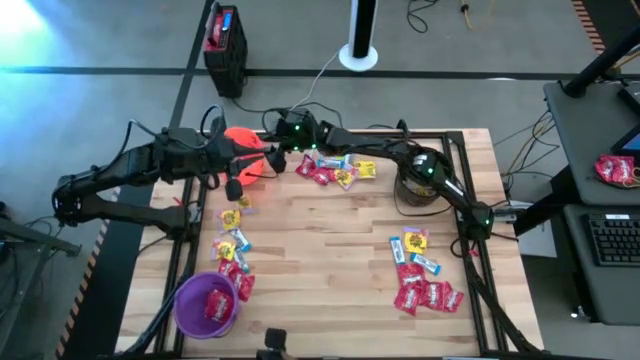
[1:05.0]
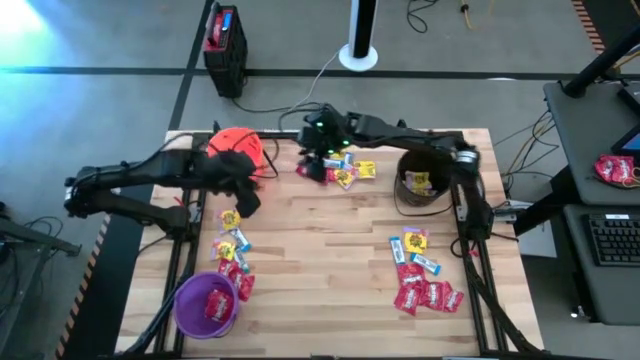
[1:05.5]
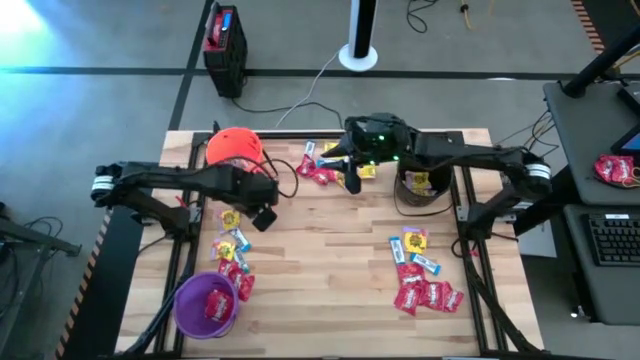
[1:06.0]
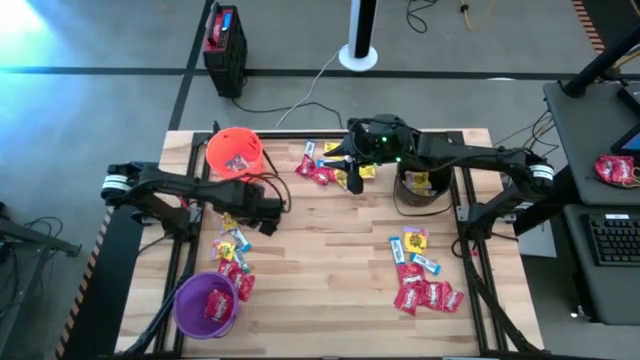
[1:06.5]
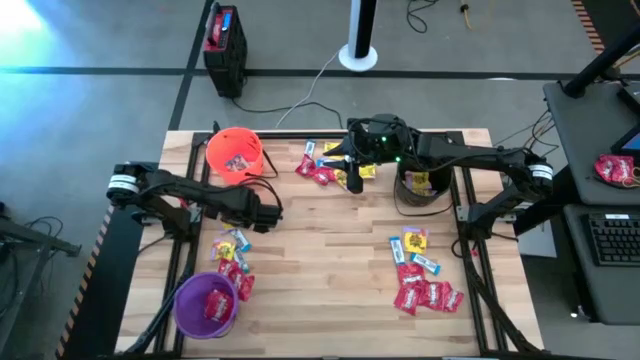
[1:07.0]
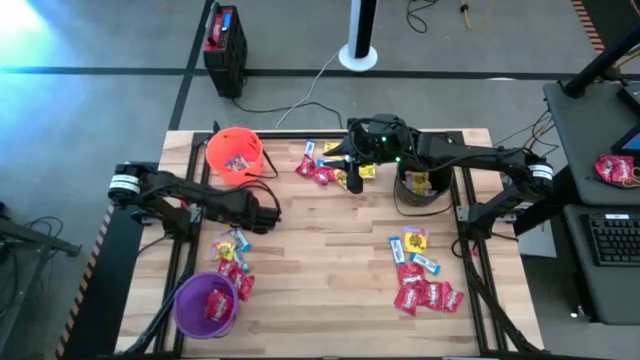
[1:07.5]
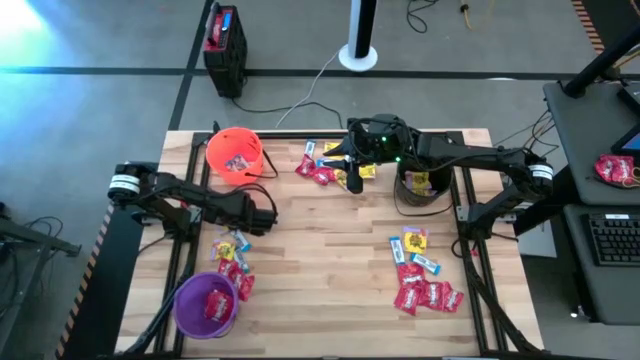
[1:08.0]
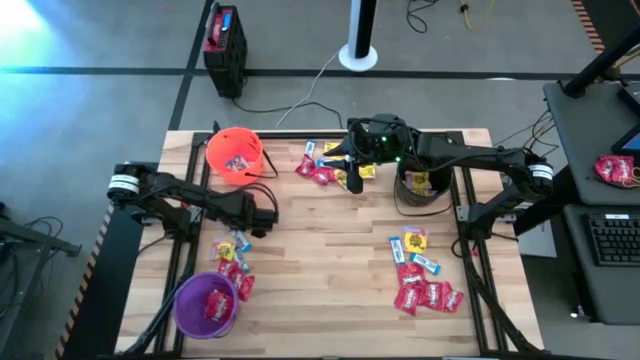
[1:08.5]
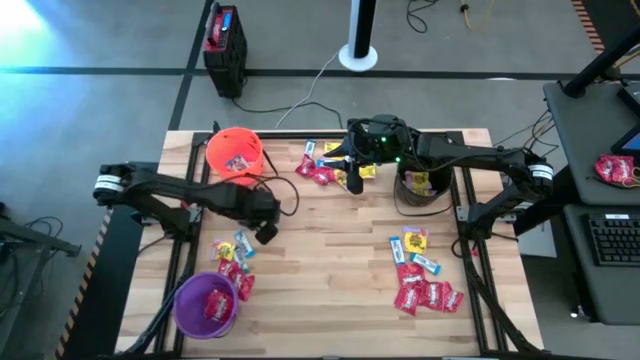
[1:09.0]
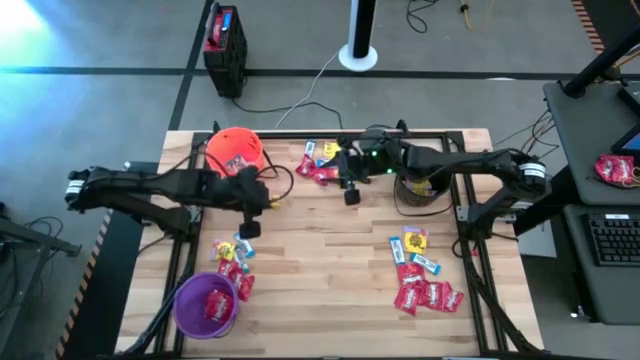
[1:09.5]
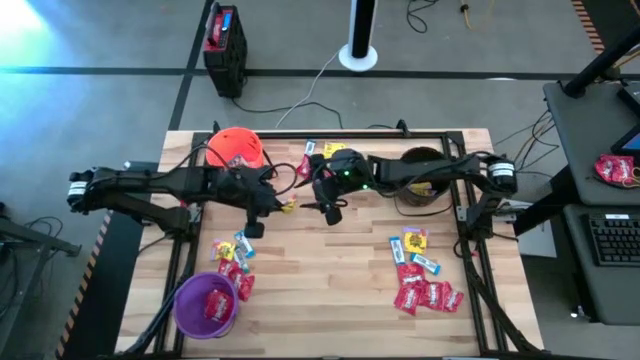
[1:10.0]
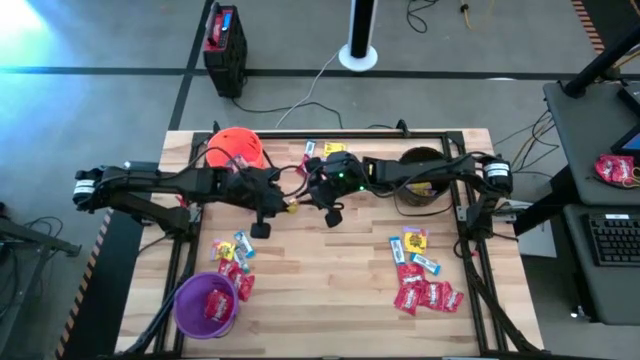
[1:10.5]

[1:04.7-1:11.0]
Task: Sort candy by brand, put in halloween buckets
Put the yellow candy into the black bucket

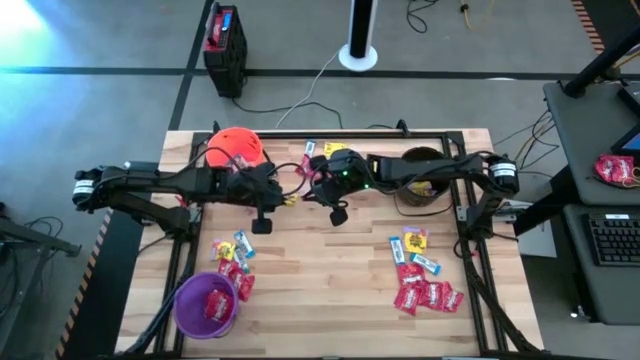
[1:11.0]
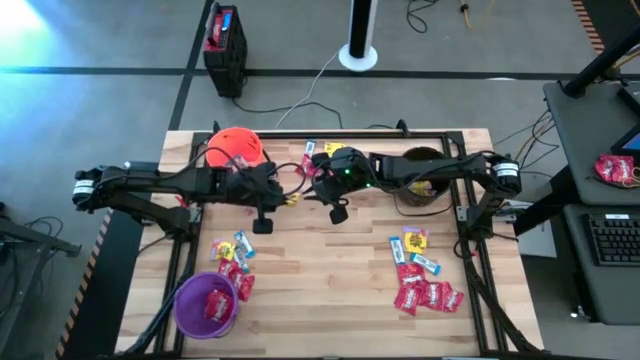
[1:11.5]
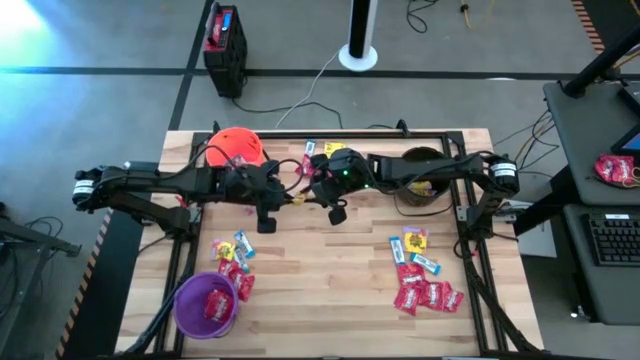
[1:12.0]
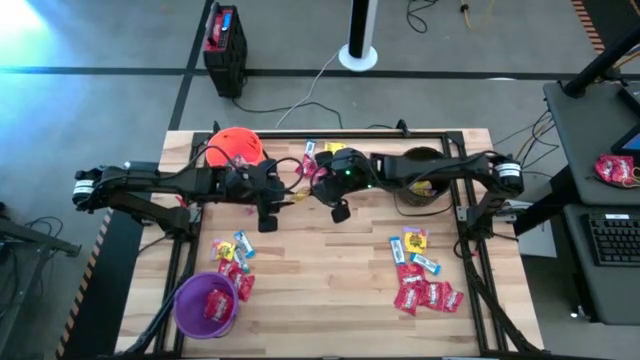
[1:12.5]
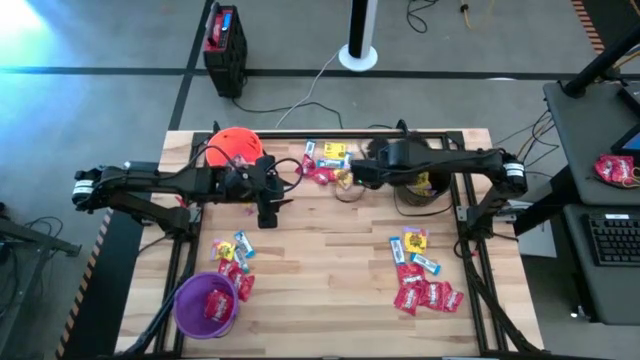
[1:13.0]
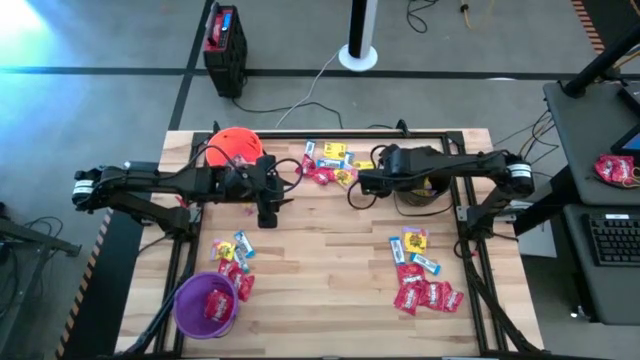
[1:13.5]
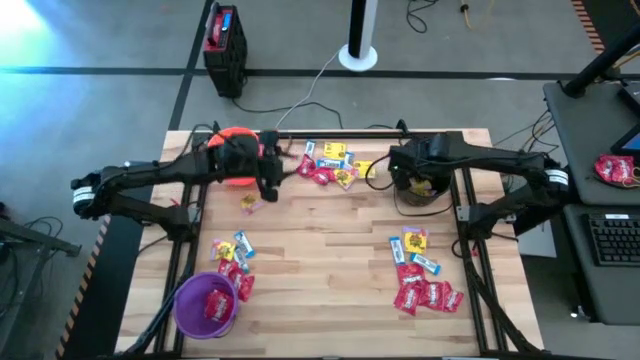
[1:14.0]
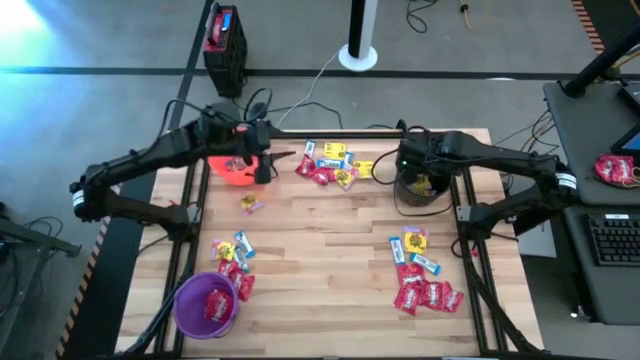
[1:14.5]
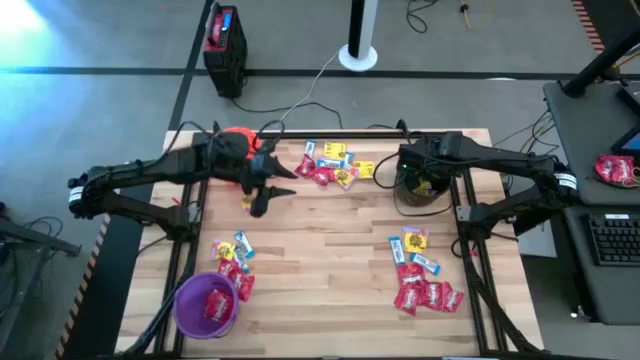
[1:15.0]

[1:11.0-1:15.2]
Put the yellow candy into the black bucket

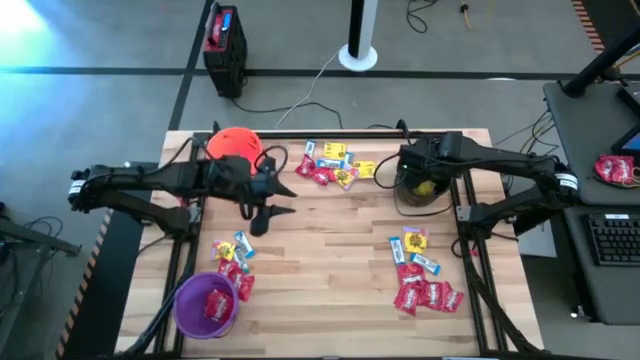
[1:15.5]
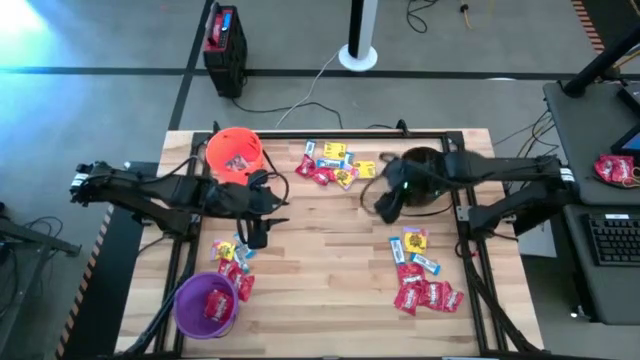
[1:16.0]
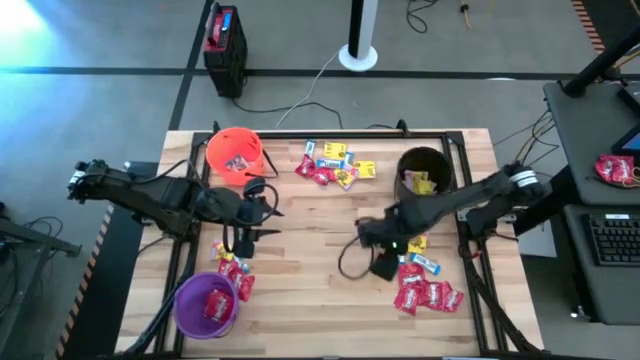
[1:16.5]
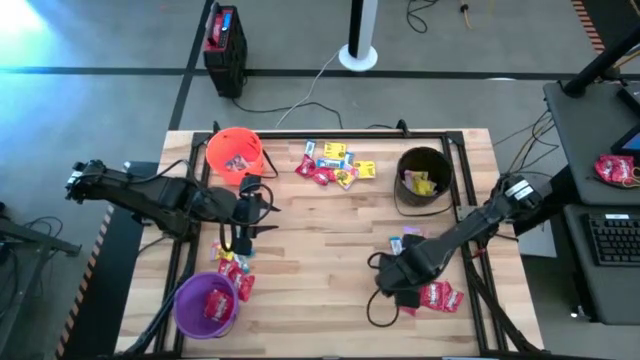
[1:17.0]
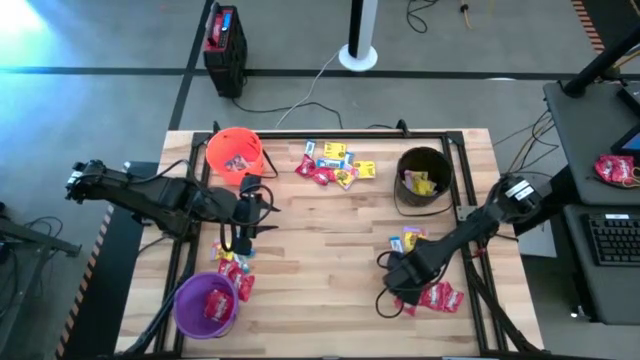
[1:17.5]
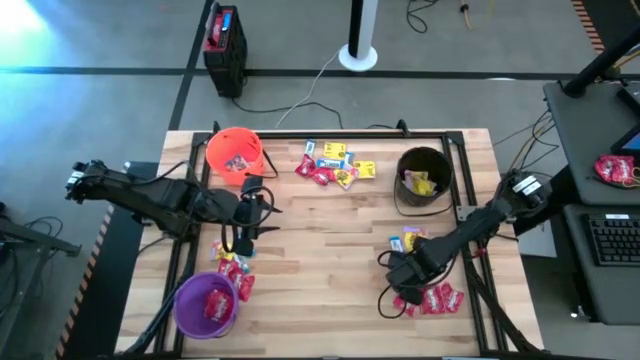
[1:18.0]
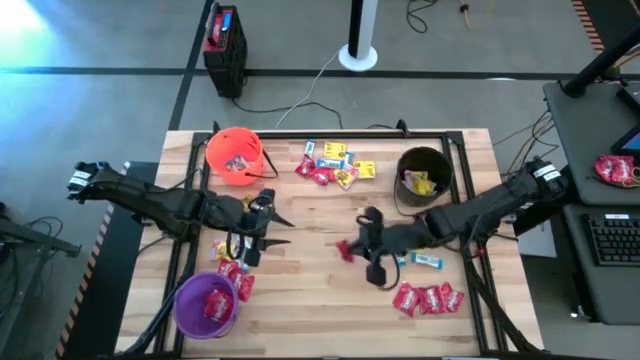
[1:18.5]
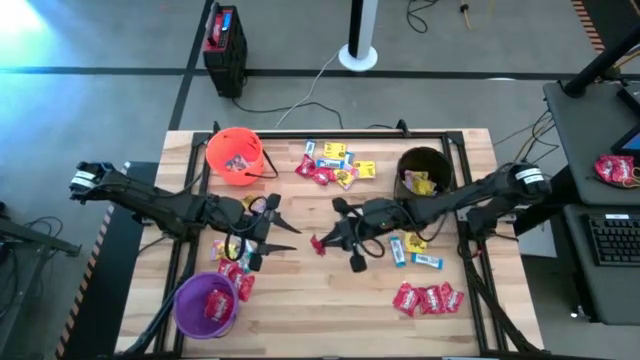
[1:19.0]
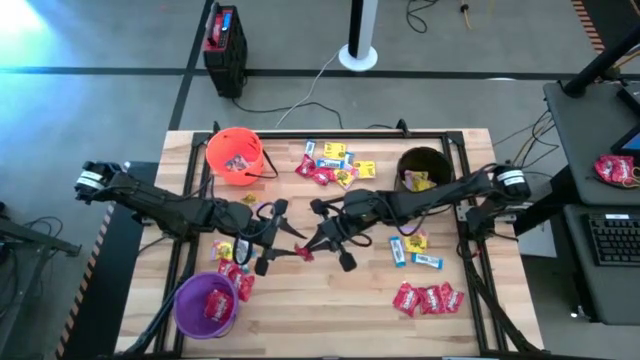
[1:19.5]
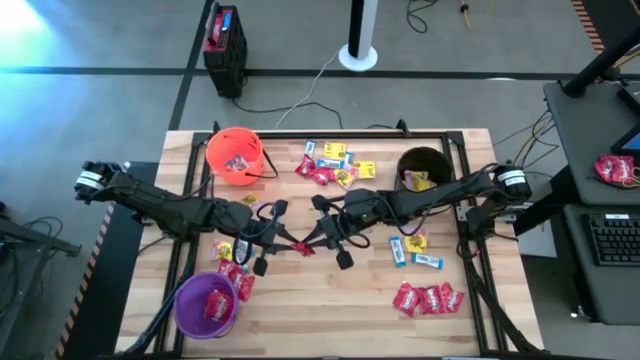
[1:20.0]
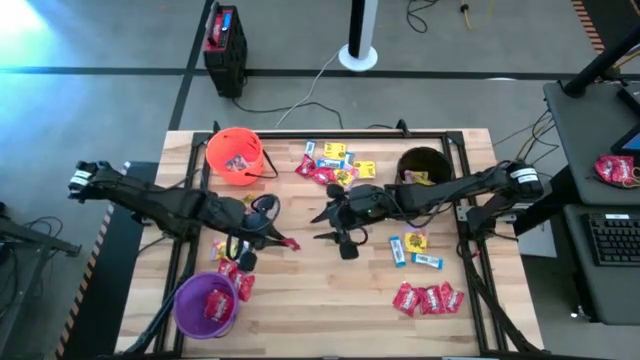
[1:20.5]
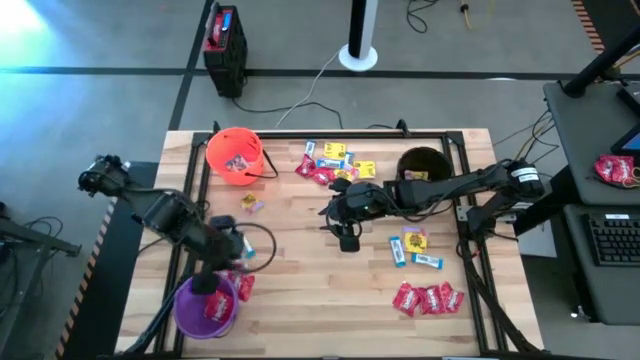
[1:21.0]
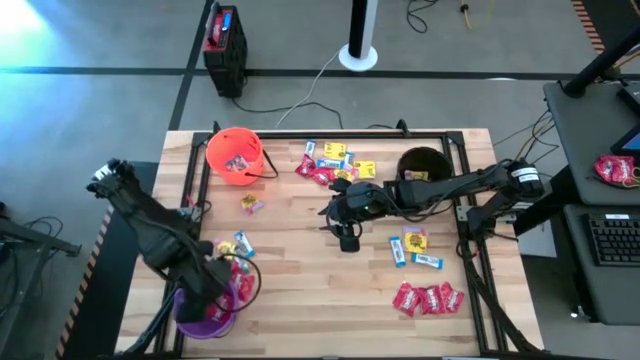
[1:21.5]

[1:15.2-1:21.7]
Put the red candy into the purple bucket

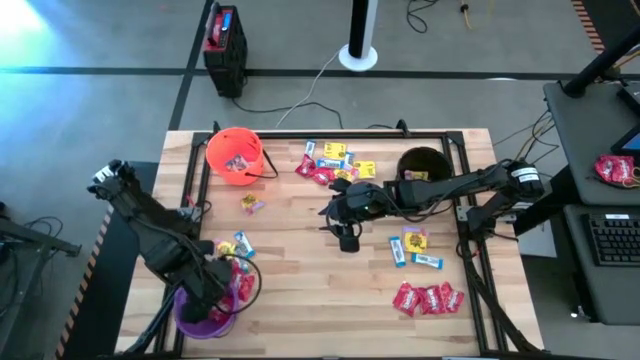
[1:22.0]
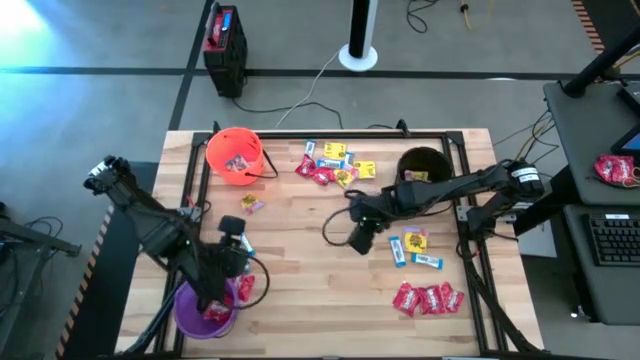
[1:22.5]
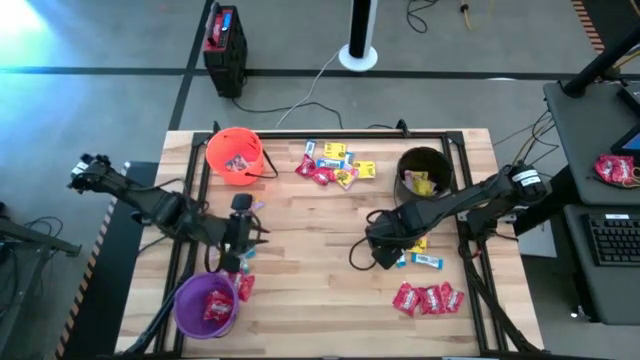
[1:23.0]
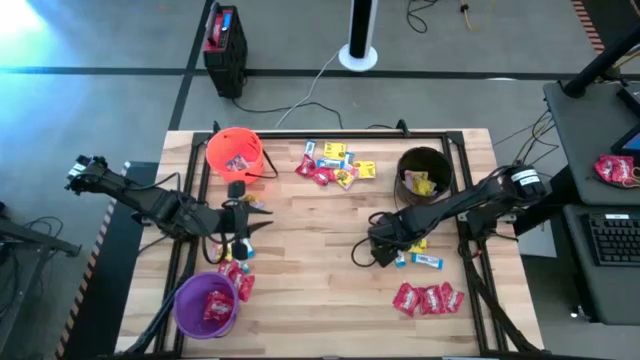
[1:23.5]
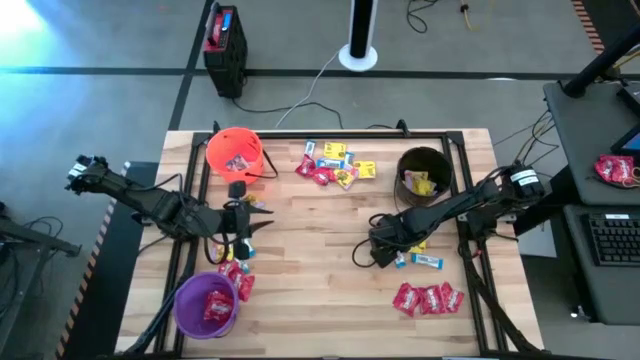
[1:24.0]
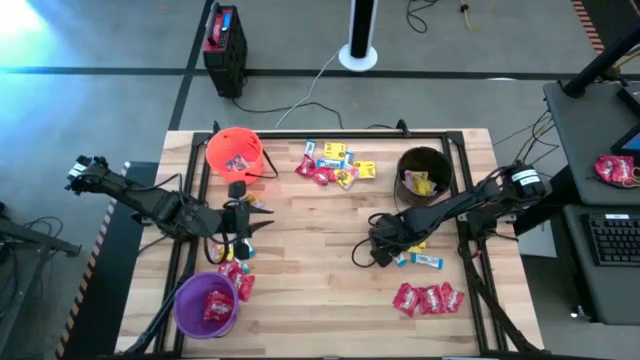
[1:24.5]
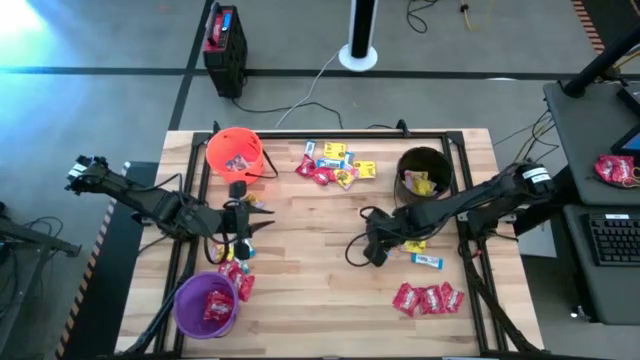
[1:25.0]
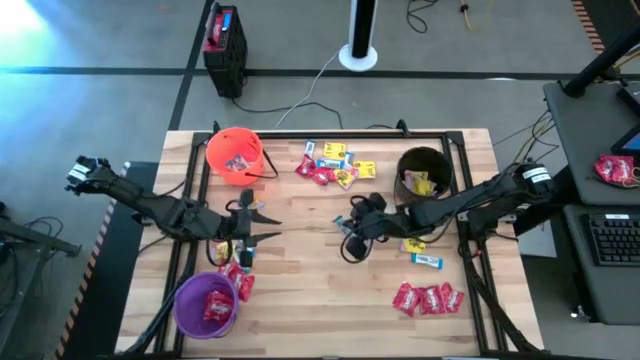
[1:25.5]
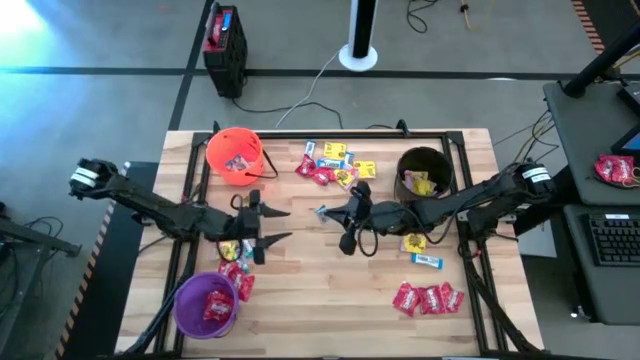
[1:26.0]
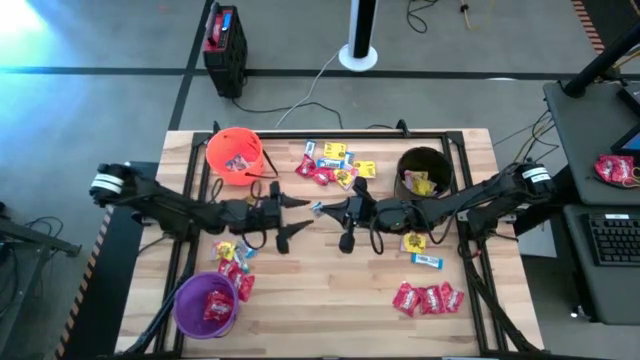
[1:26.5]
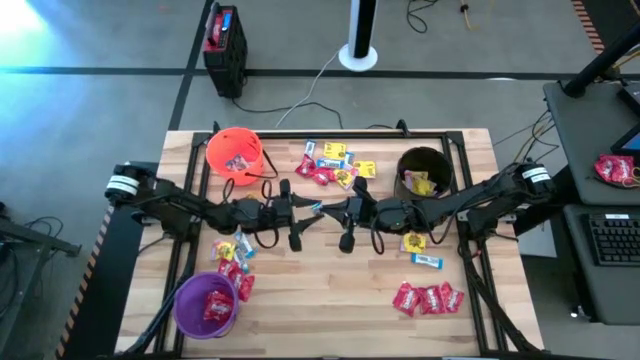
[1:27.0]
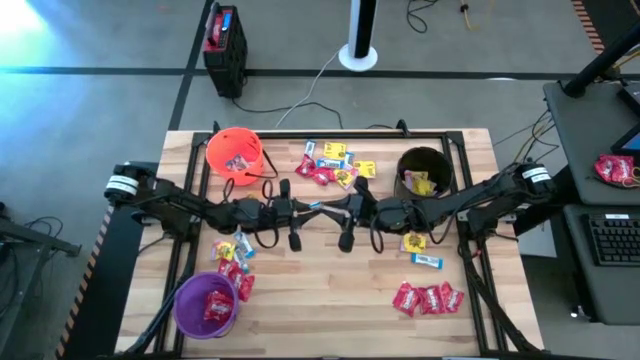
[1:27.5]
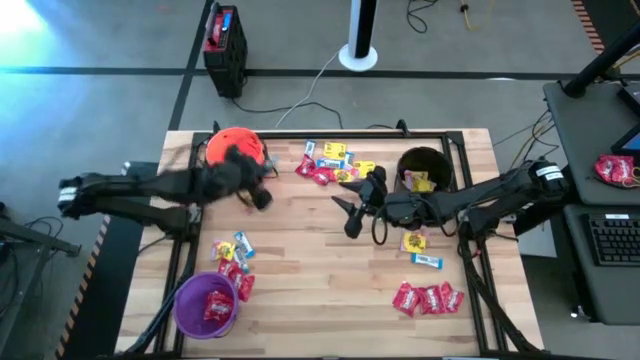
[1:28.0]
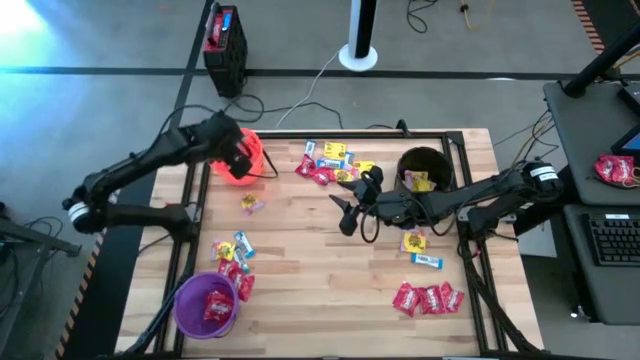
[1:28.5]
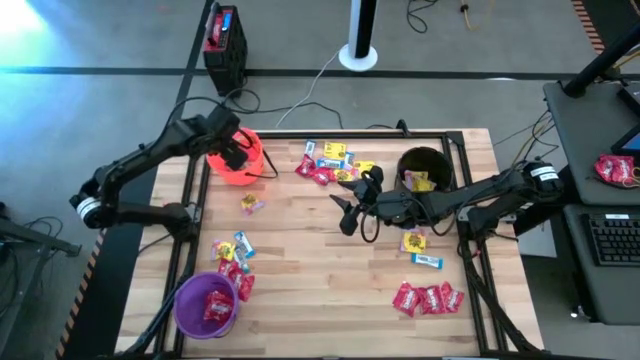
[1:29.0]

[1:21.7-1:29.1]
Put the white chocolate bar into the orange bucket
